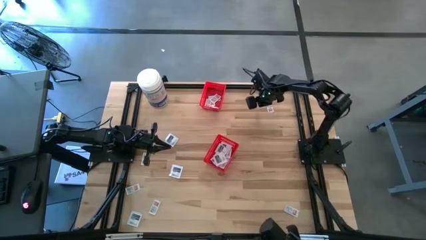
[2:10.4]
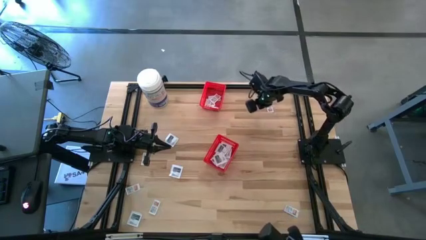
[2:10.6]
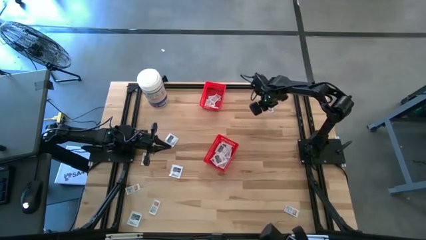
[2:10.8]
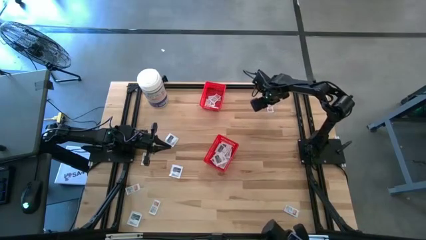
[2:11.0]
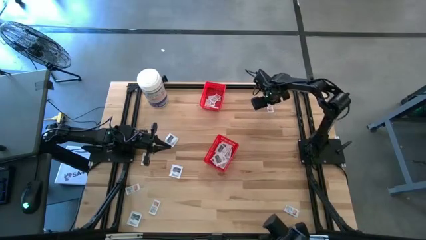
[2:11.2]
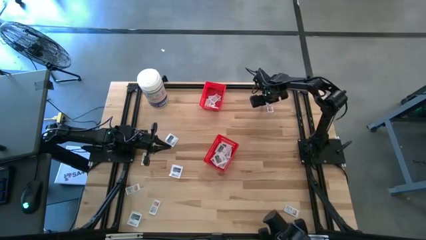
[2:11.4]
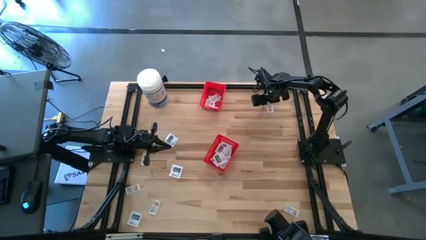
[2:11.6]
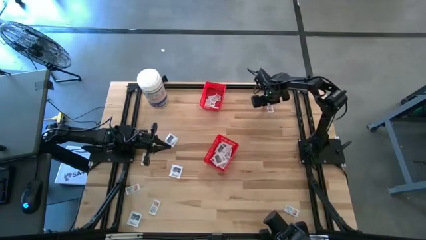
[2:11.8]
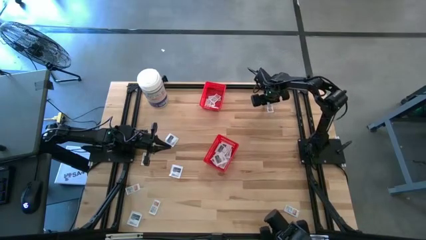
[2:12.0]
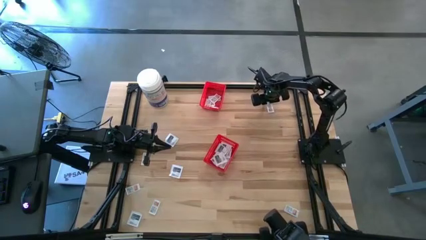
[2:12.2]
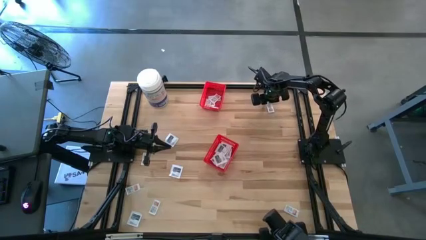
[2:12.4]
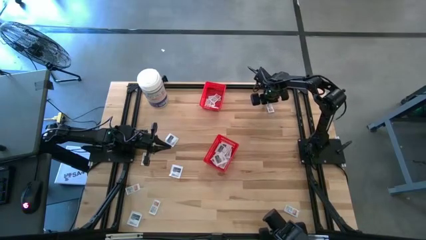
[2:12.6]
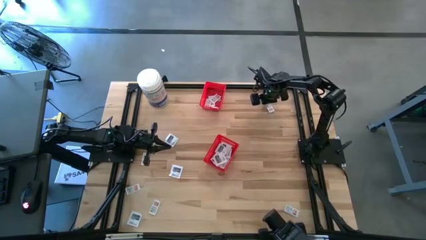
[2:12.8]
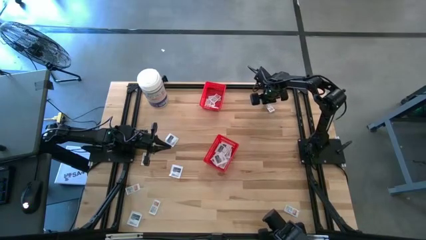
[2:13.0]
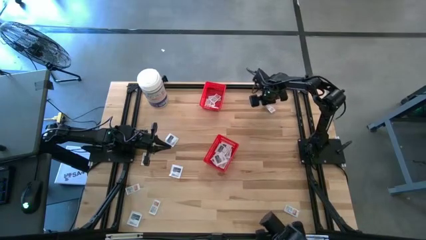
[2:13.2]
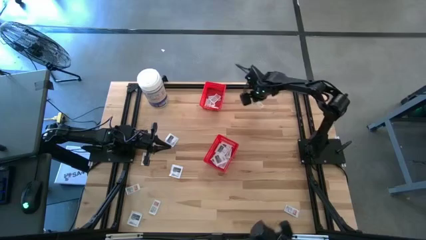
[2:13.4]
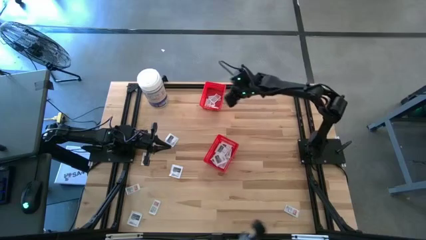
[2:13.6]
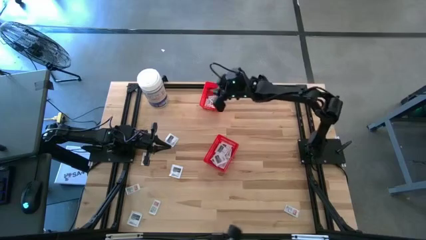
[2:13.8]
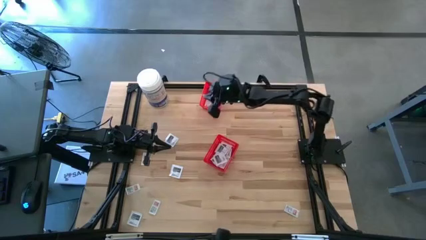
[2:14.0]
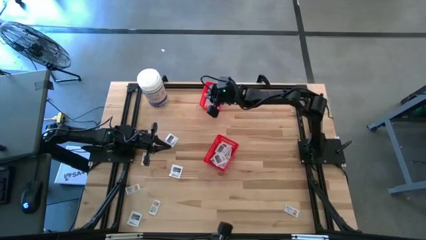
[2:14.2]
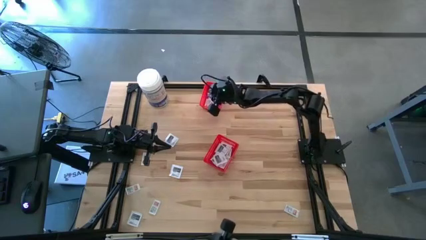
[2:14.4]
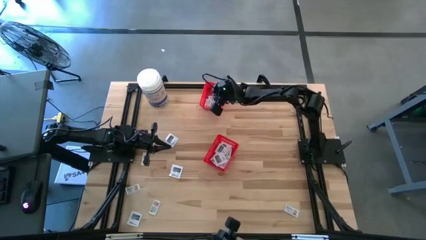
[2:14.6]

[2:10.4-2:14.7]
Task: Pick & Place First Aid Supplies
Put the white ointment pack into the top red bin

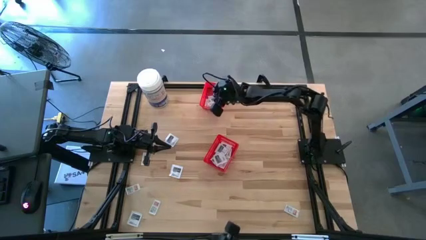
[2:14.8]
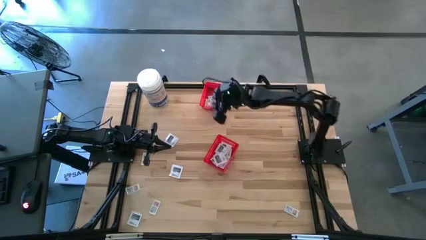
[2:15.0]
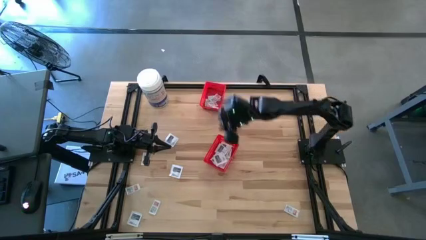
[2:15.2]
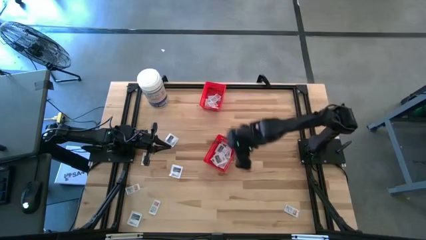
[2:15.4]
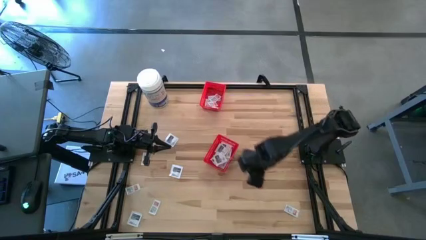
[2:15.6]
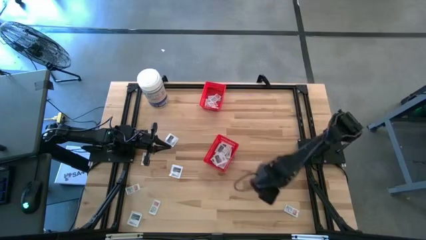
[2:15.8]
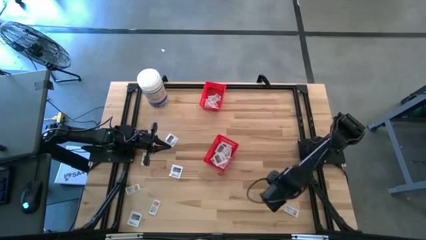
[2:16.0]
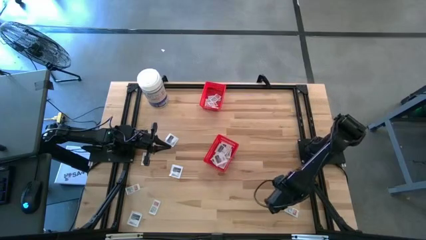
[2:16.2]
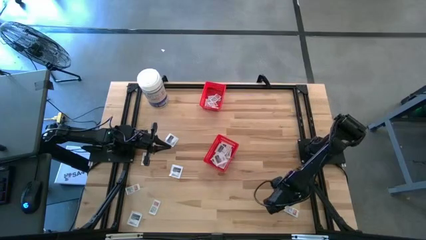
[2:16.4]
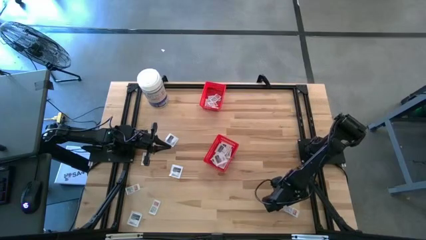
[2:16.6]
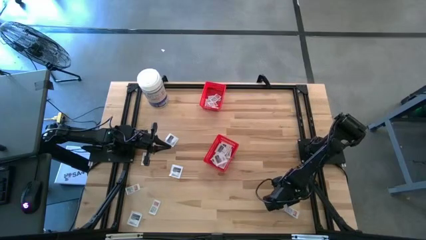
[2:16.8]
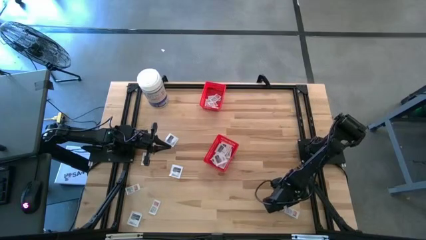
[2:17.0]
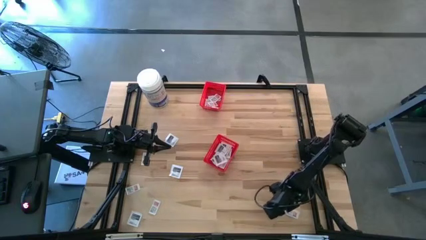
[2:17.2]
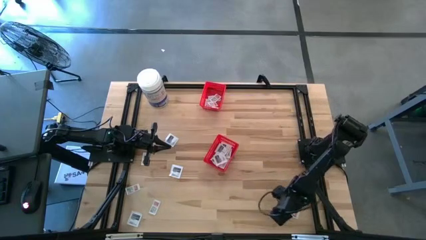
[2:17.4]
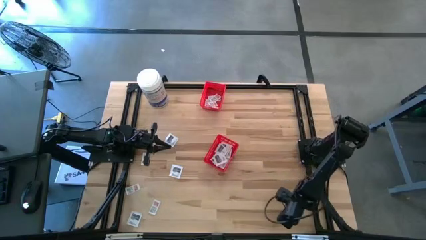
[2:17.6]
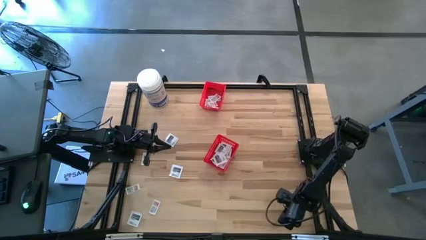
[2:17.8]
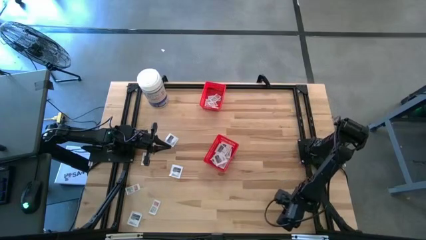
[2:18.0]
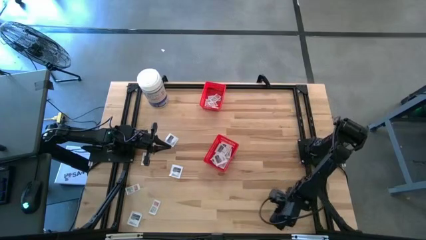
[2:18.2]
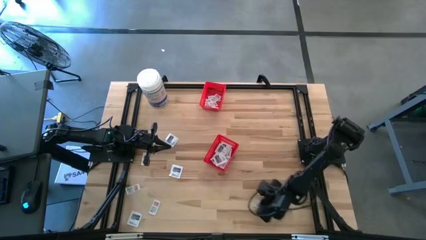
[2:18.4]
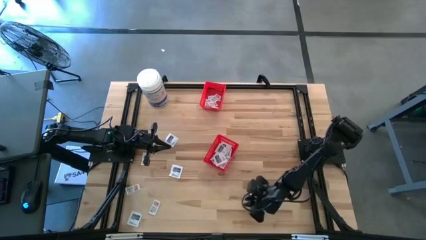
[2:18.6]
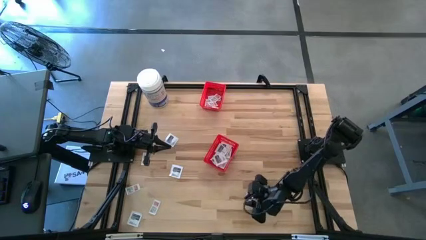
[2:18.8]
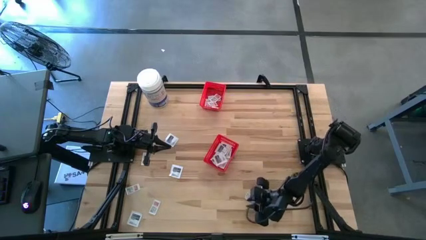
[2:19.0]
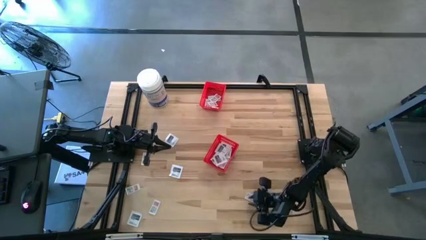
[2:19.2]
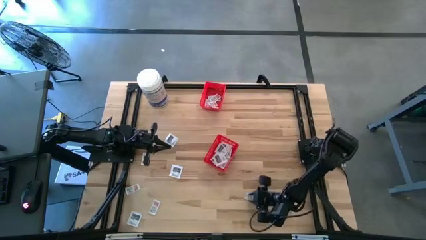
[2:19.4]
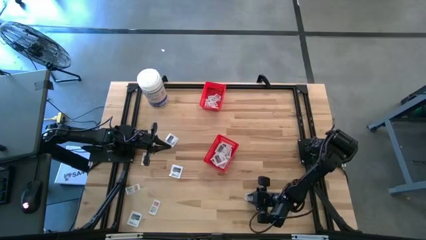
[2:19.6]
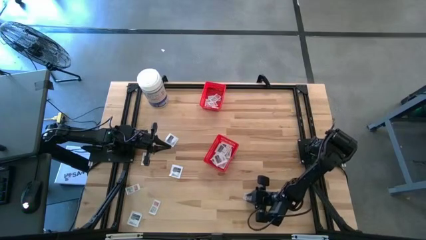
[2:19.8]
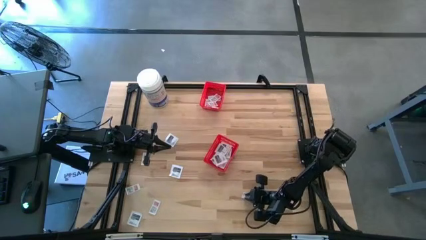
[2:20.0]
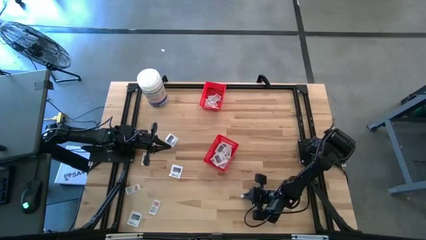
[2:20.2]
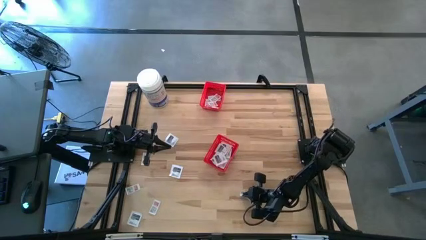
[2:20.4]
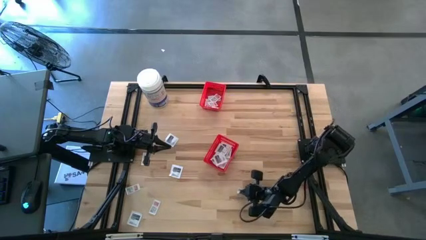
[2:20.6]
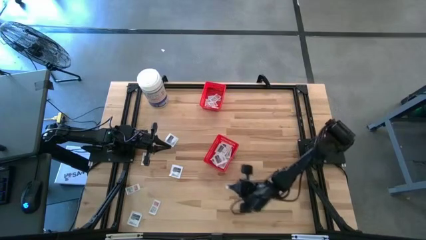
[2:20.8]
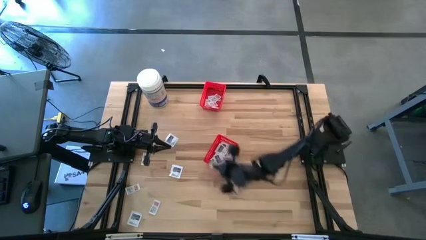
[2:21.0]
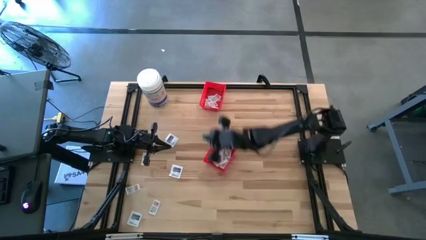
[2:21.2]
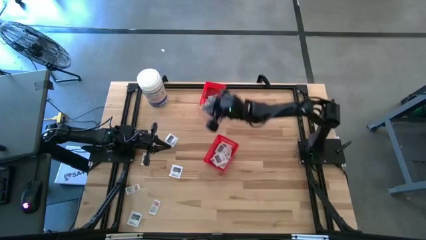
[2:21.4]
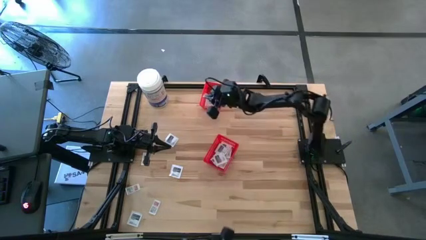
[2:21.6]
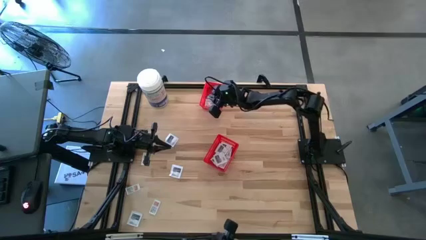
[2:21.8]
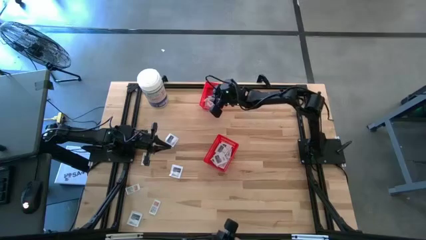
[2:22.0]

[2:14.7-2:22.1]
Put the white ointment pack into the top red bin
